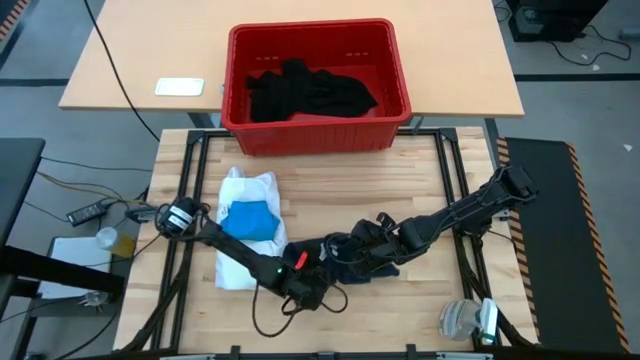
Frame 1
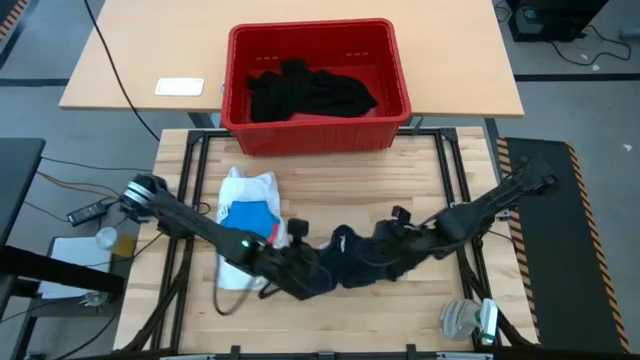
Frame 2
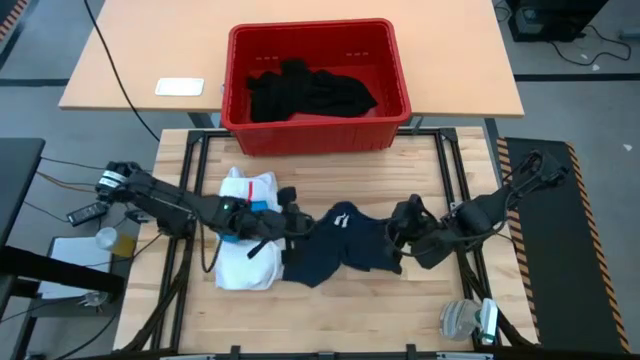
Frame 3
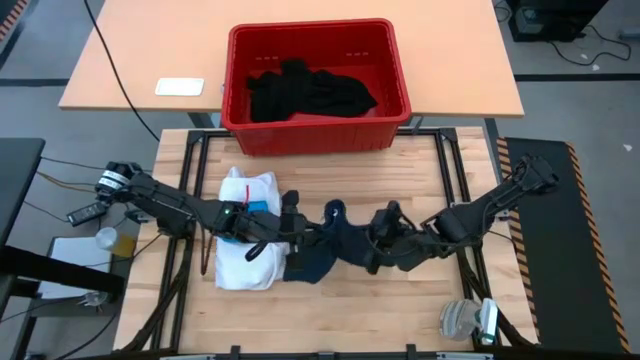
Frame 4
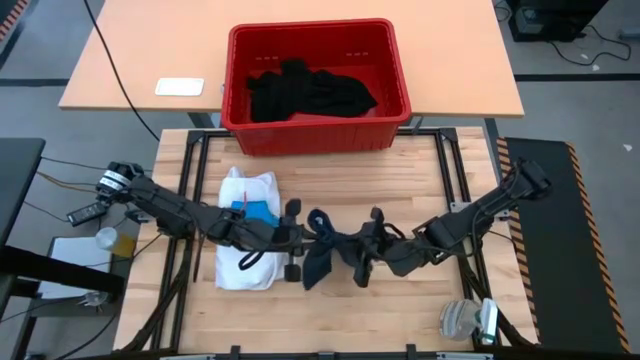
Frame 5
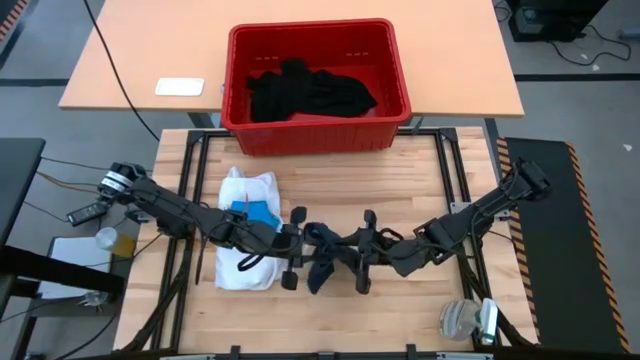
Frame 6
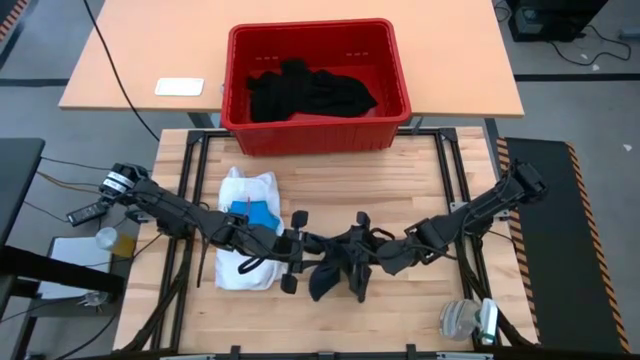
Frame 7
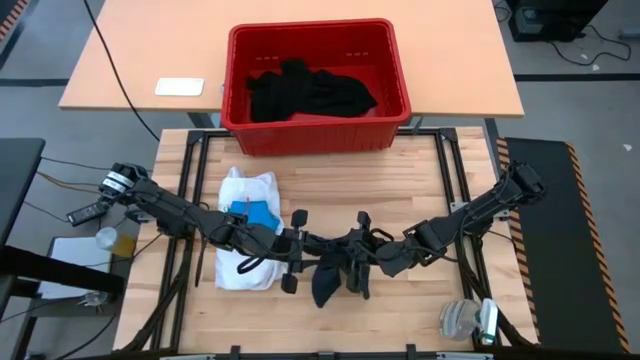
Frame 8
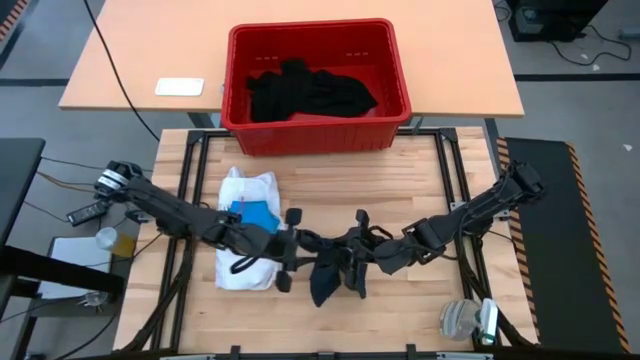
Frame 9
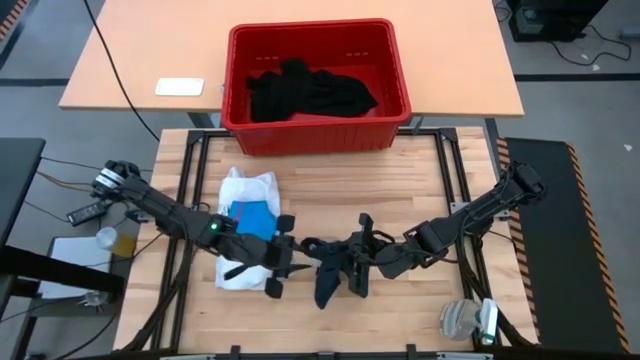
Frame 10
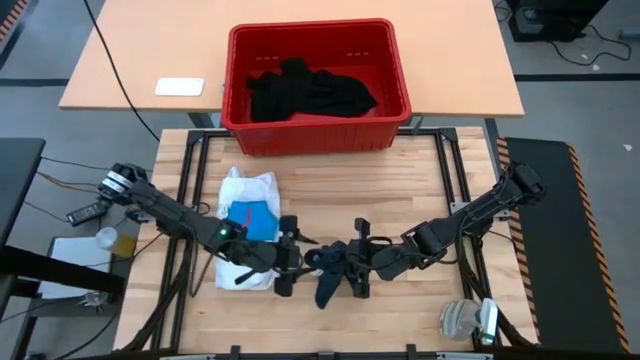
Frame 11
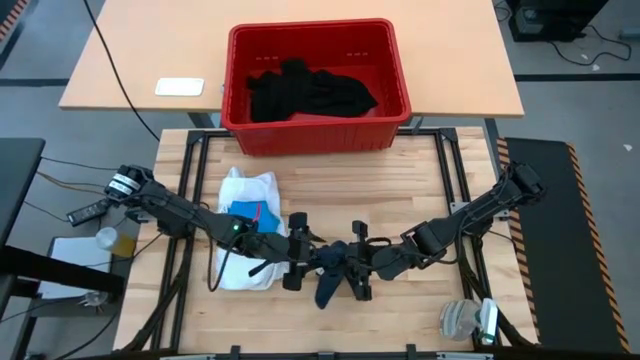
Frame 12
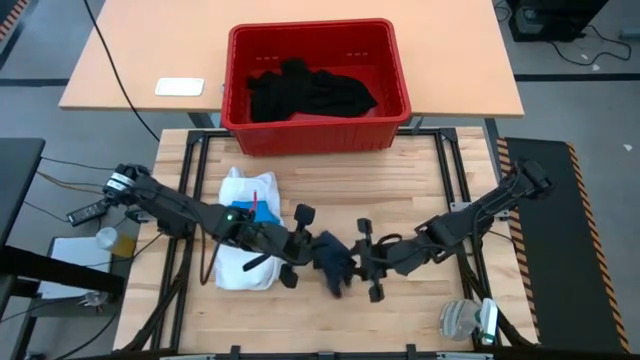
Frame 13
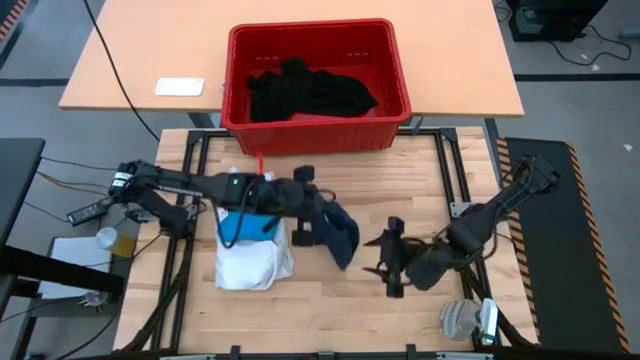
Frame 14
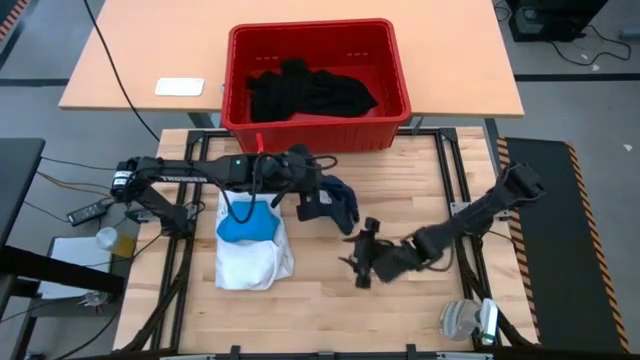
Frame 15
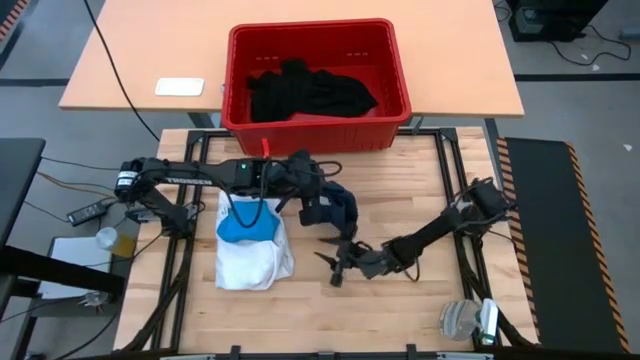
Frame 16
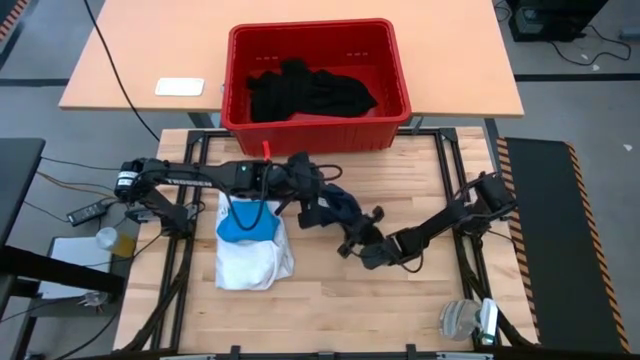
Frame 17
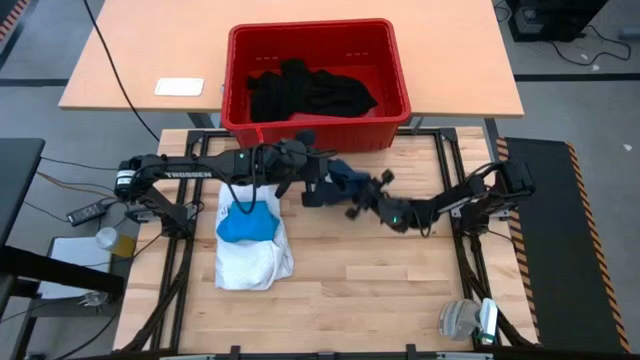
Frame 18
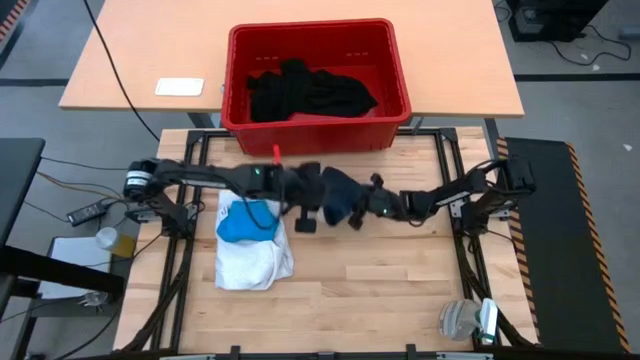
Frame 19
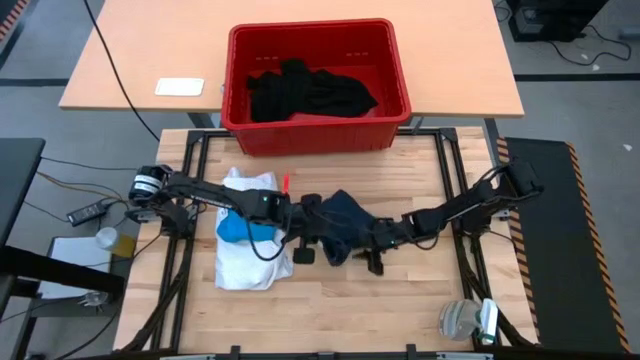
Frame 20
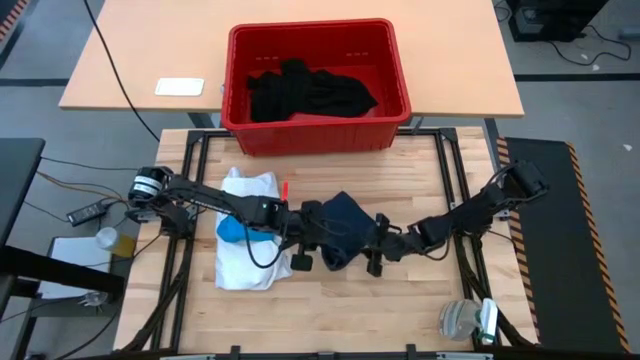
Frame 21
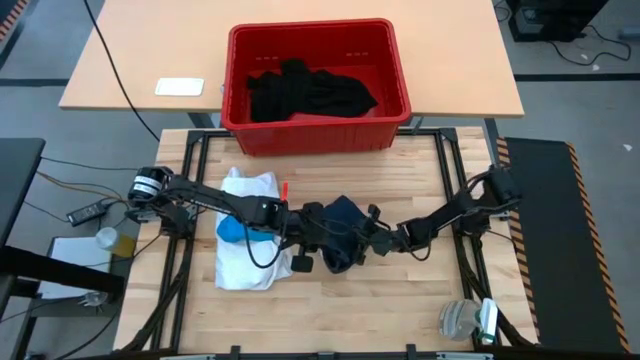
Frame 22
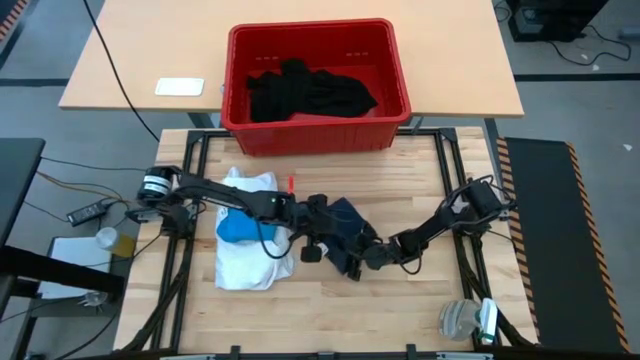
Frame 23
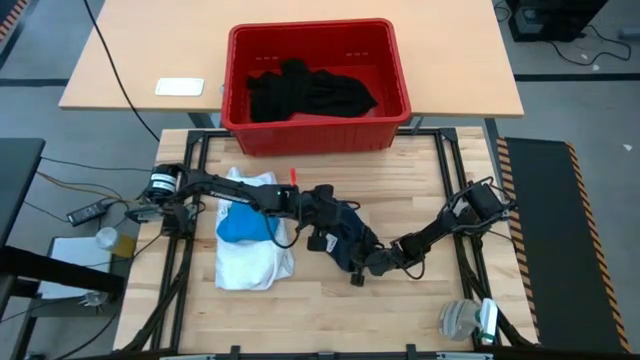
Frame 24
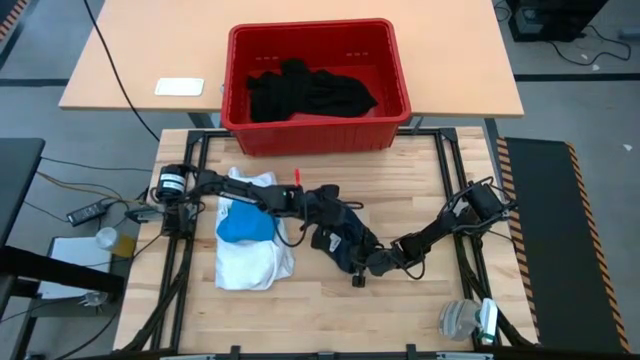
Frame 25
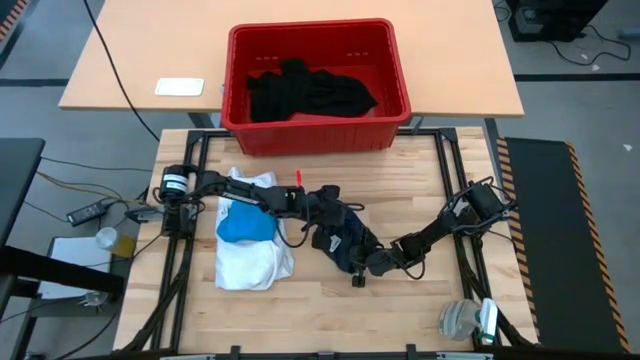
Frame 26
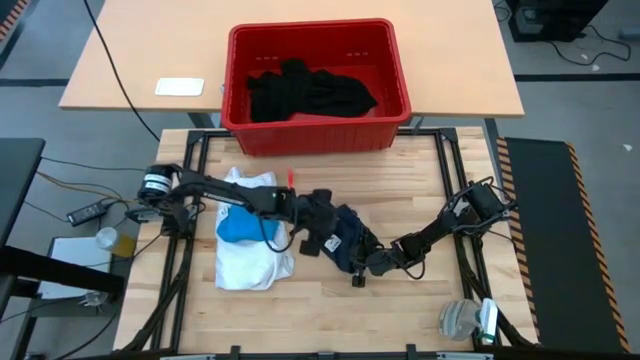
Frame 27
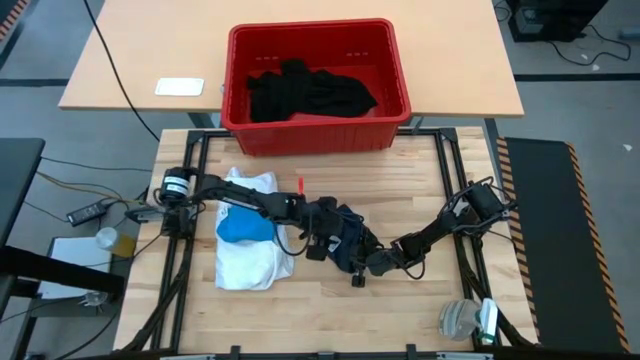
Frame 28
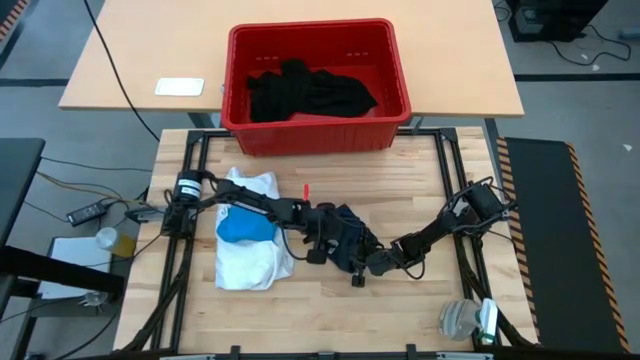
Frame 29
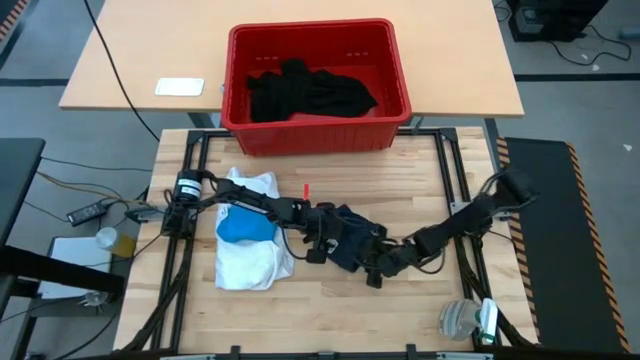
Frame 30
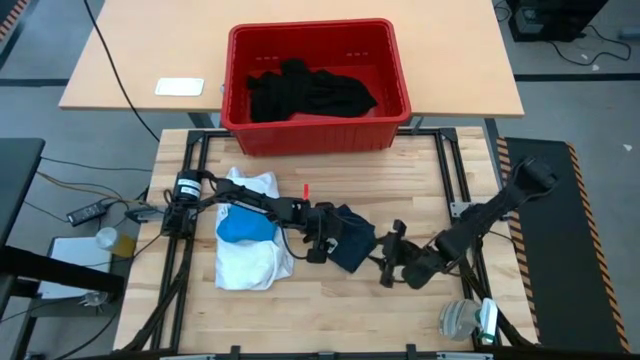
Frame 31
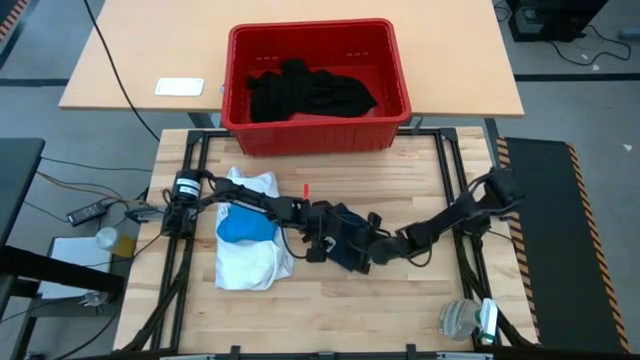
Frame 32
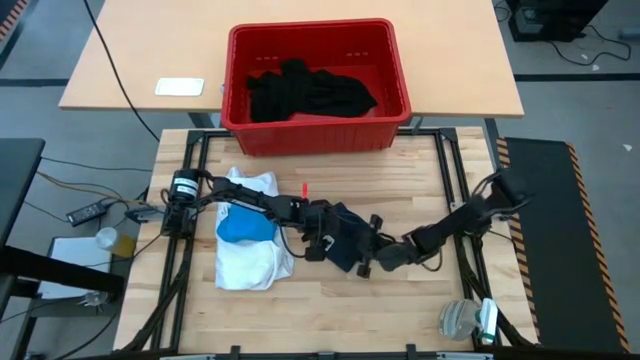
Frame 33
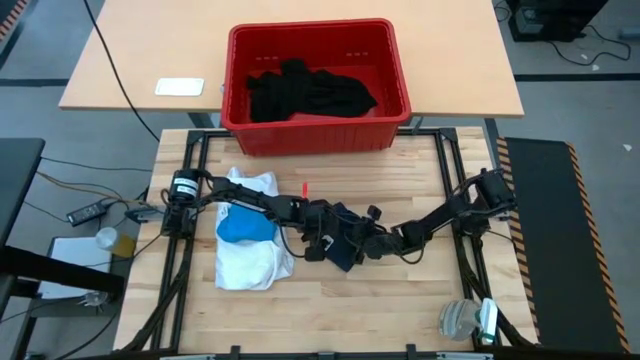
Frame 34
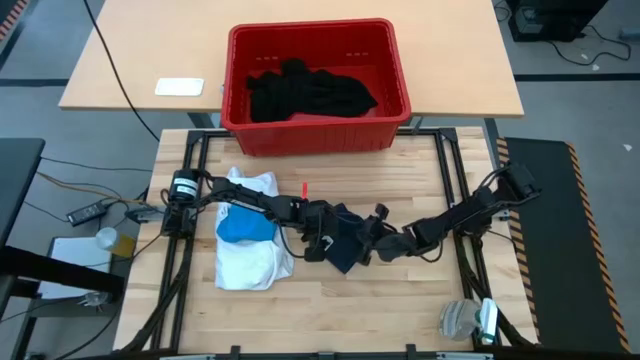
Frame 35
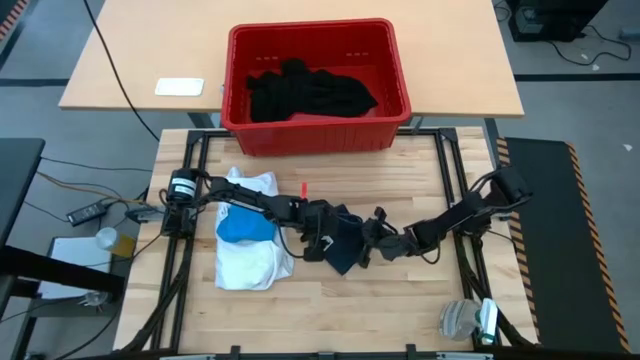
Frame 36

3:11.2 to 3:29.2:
Task: Fold laundry
Fold the dark blue underwear

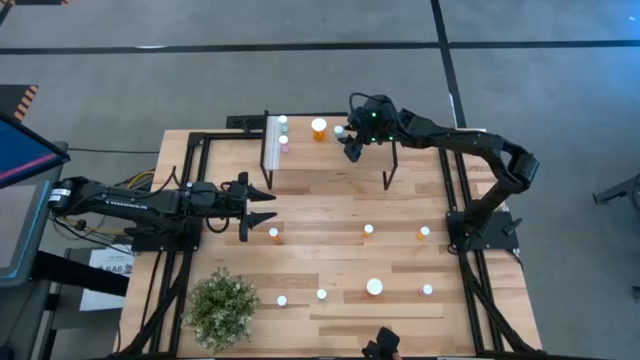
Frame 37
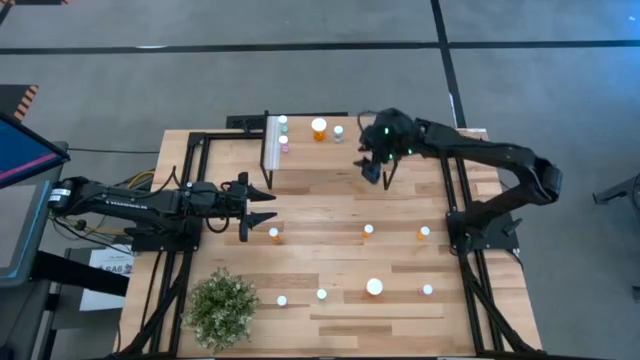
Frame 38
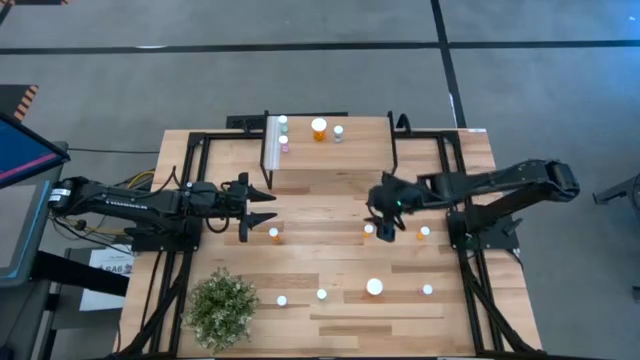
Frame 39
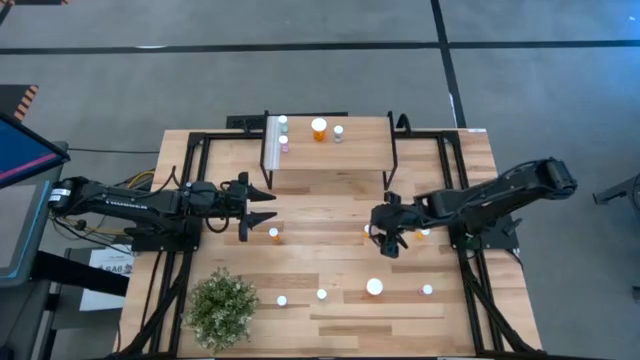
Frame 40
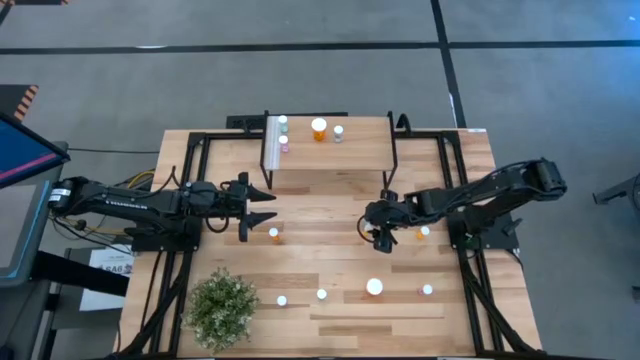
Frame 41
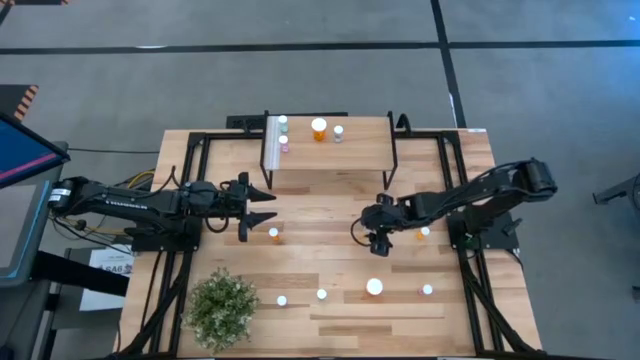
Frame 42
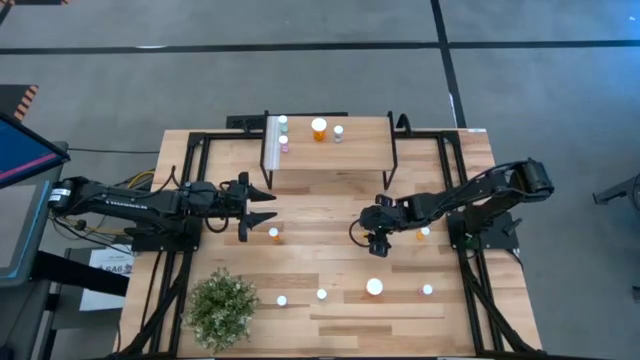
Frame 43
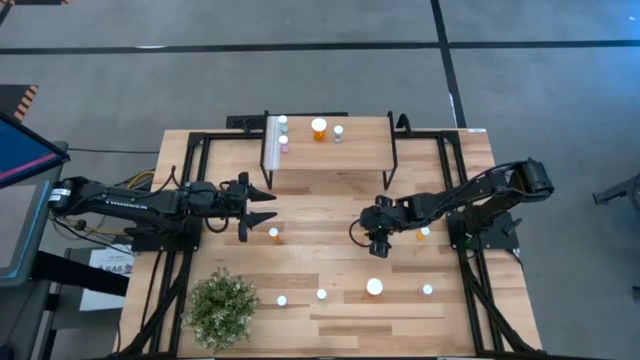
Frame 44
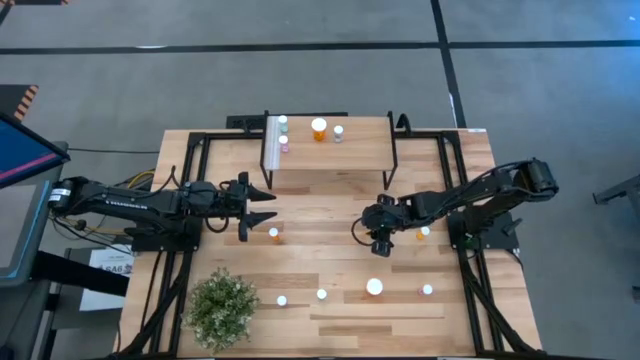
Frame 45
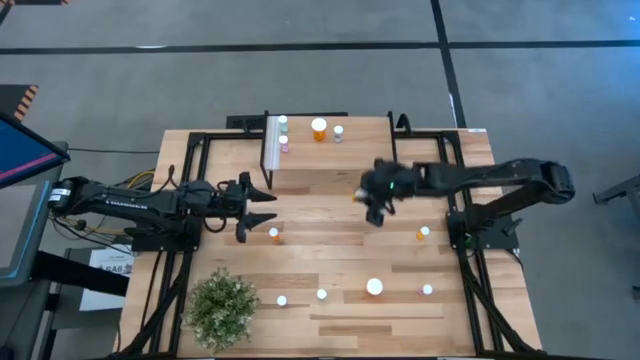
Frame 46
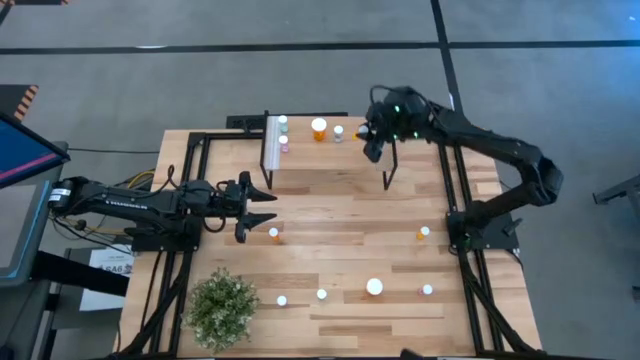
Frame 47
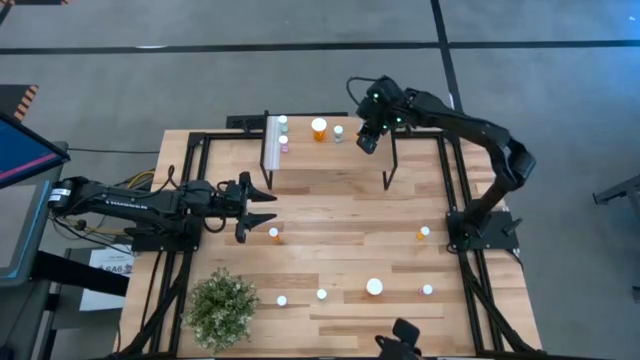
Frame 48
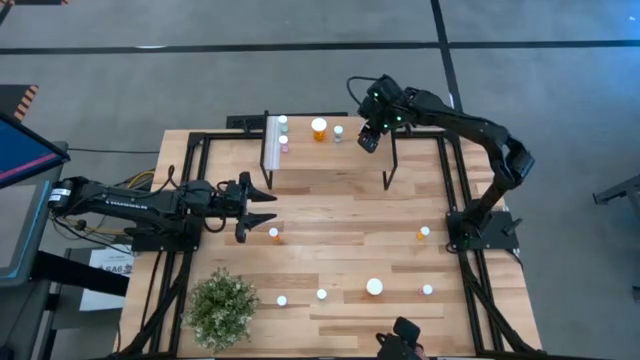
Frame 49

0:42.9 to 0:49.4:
Task: Pick and place medicine bottles onto shelf by color
Put the middle small orange pill bottle on the shelf
